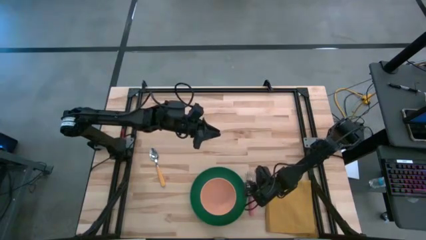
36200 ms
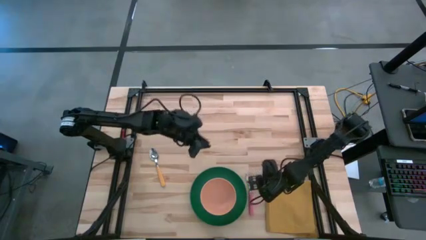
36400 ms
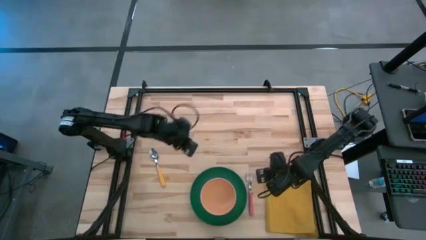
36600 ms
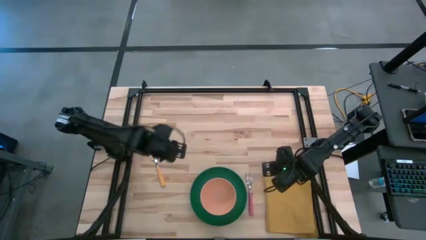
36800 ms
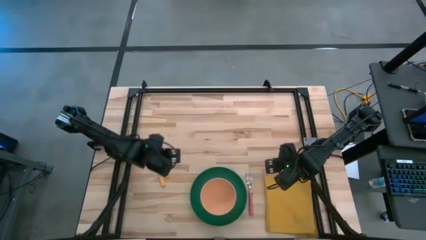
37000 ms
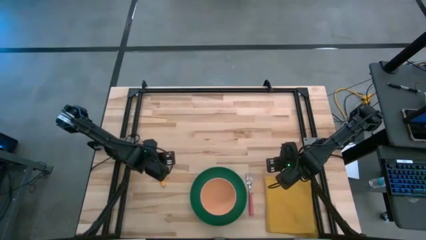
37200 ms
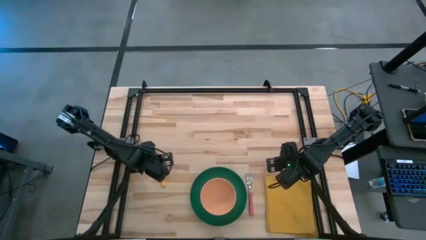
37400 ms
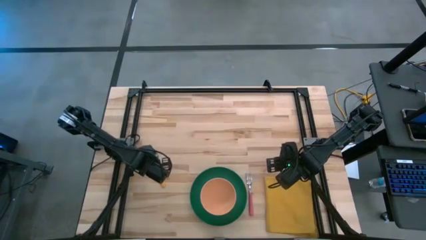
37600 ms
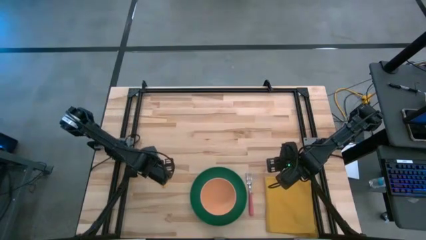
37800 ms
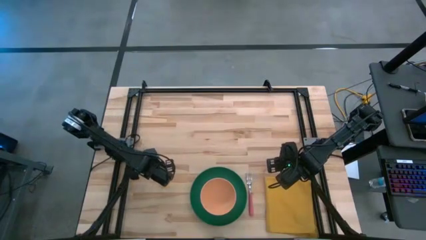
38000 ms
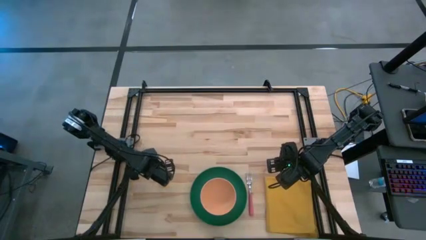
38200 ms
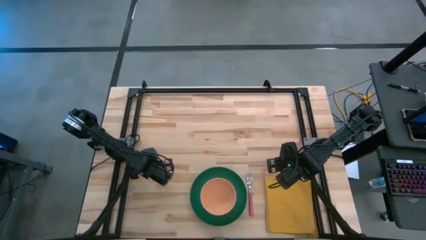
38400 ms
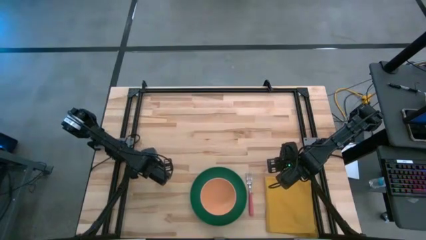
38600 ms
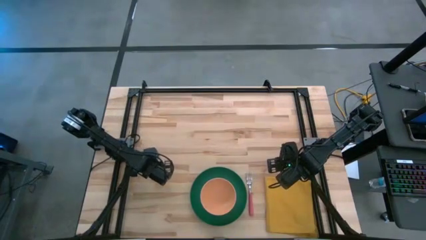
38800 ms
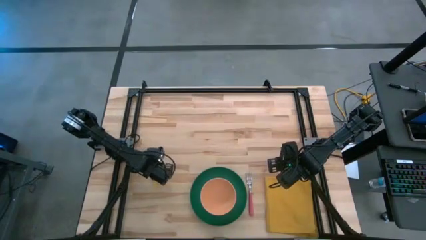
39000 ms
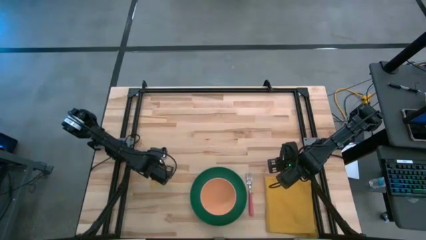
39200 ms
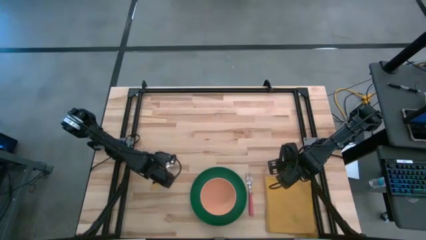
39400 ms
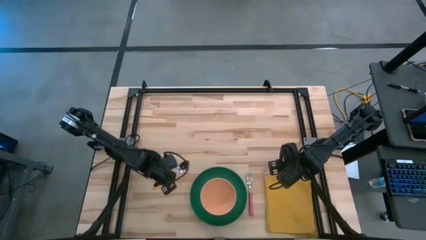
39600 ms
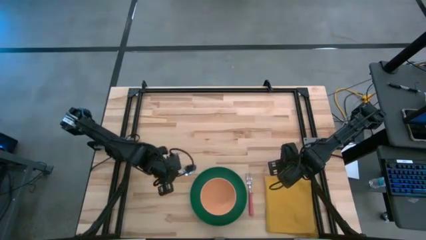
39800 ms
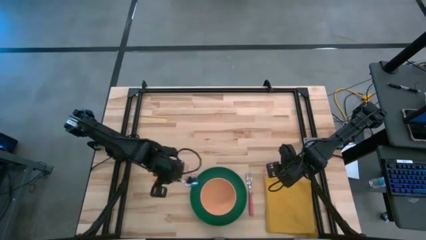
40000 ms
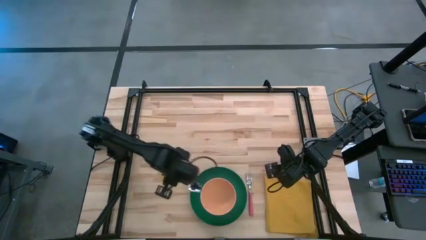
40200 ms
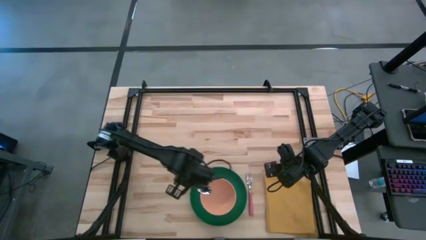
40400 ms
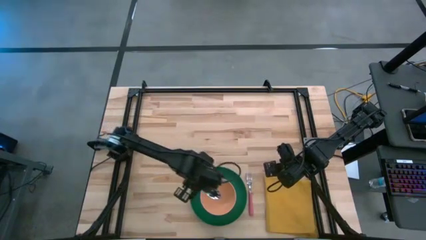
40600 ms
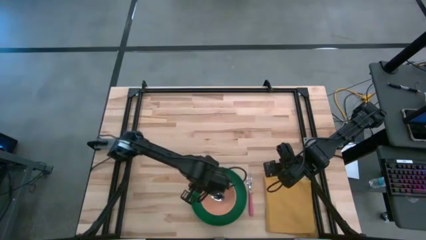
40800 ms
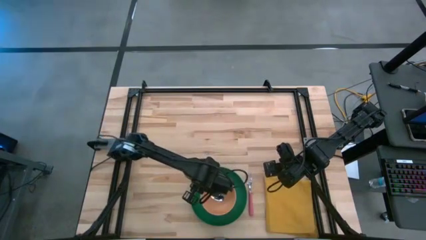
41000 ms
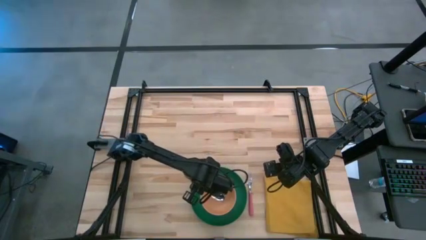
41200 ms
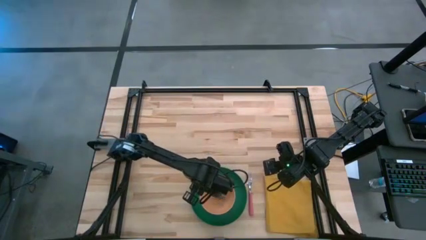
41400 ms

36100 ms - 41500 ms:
Task: Set table place
Put the yellow spoon into the orange bowl

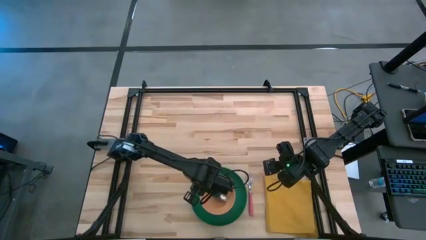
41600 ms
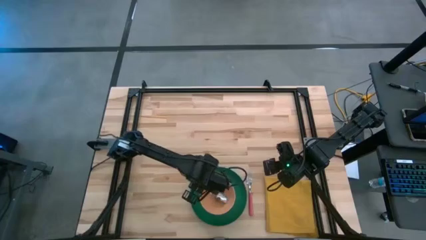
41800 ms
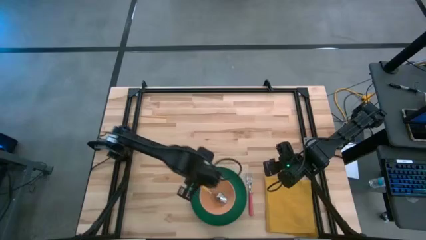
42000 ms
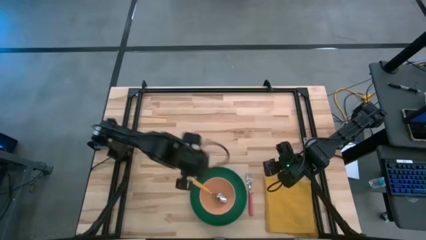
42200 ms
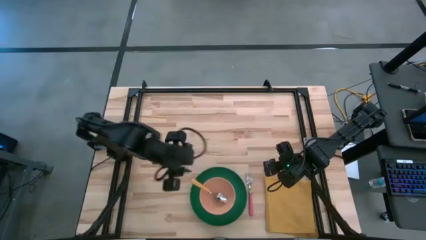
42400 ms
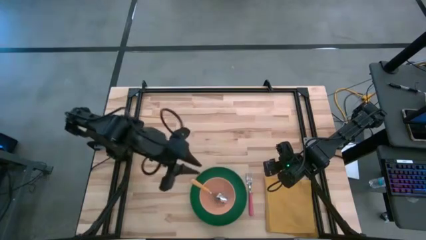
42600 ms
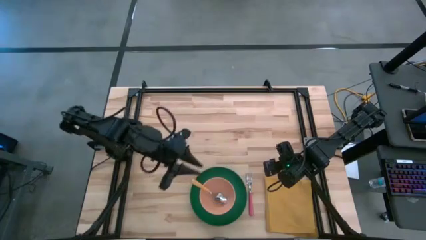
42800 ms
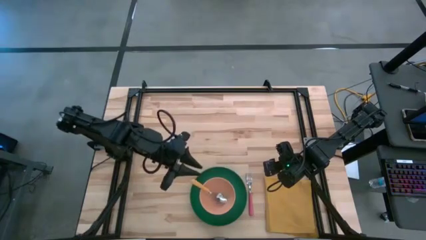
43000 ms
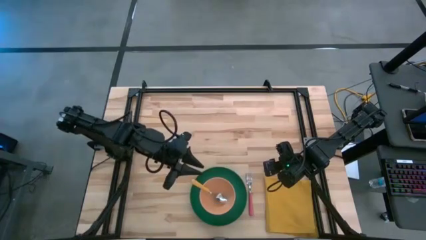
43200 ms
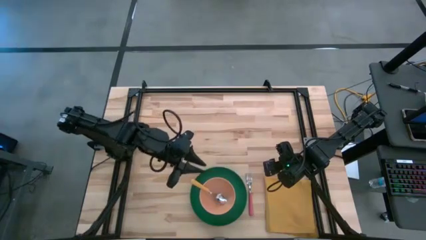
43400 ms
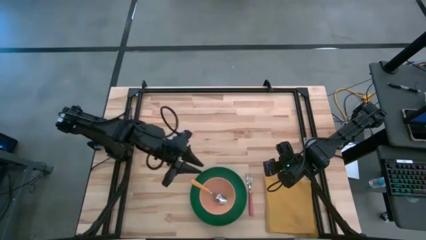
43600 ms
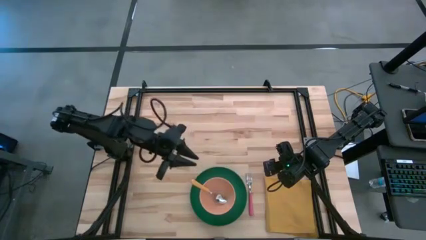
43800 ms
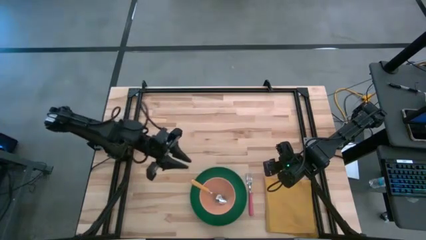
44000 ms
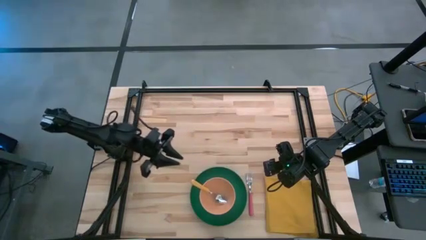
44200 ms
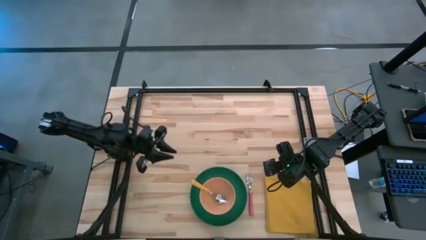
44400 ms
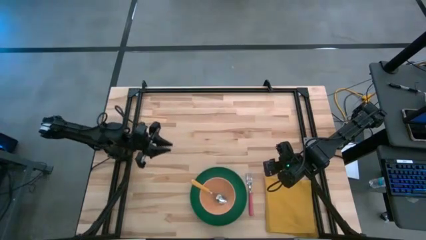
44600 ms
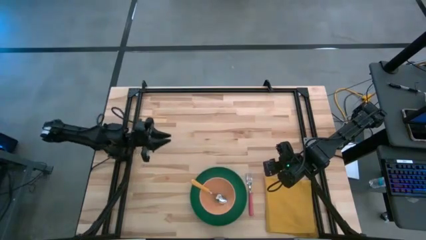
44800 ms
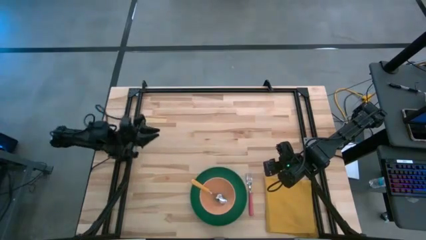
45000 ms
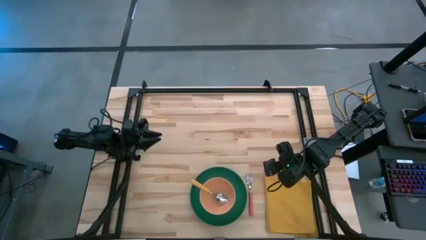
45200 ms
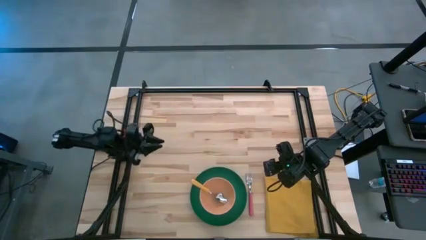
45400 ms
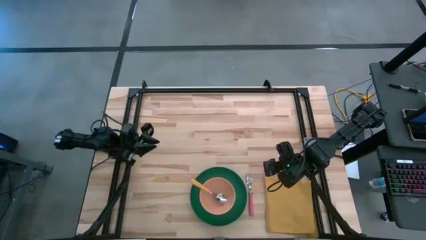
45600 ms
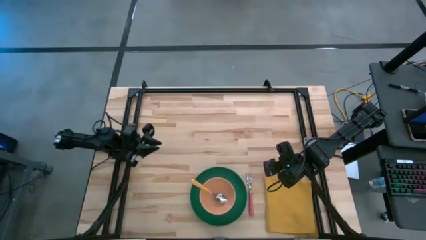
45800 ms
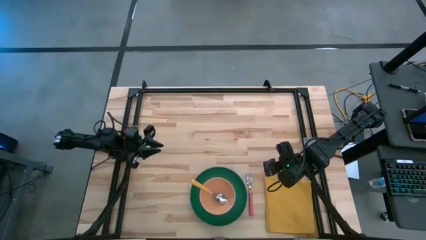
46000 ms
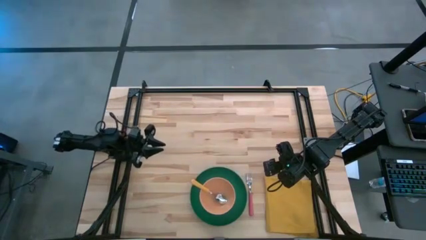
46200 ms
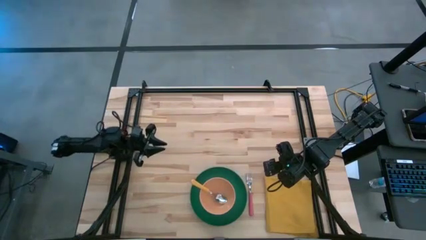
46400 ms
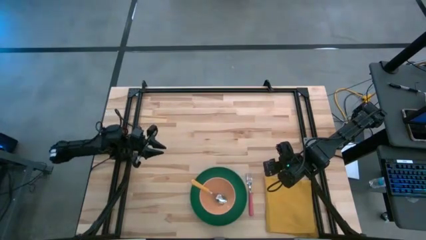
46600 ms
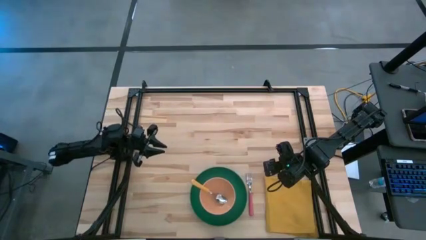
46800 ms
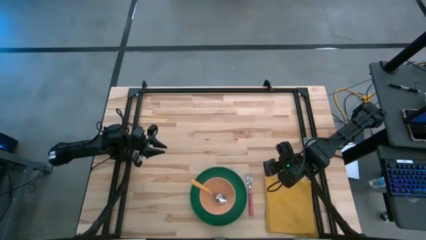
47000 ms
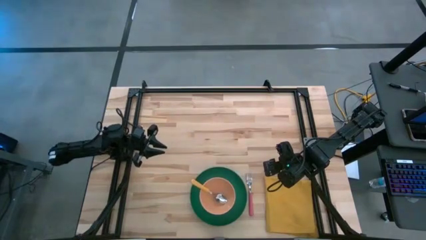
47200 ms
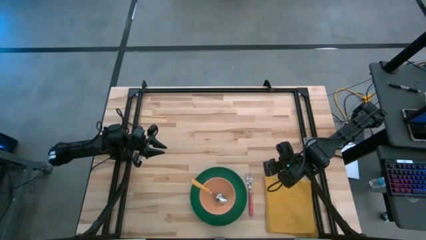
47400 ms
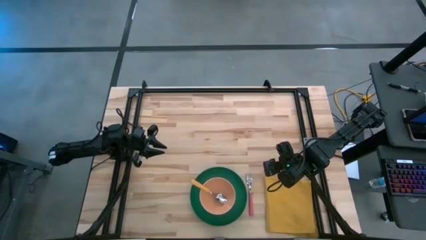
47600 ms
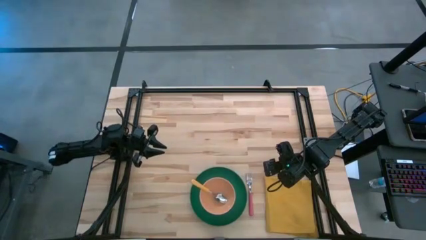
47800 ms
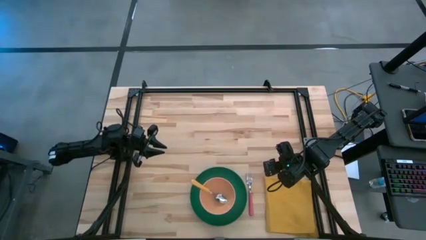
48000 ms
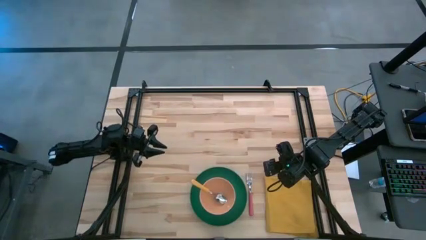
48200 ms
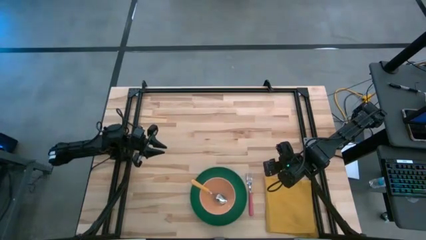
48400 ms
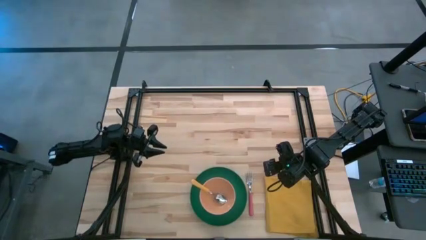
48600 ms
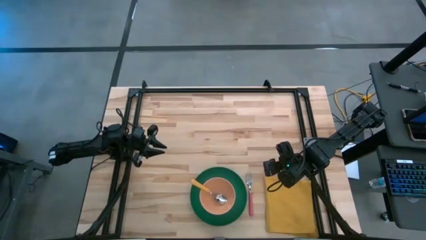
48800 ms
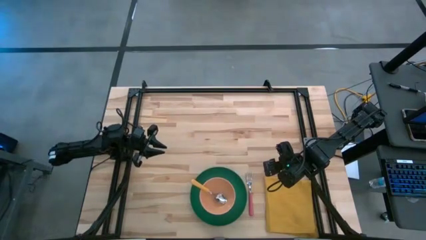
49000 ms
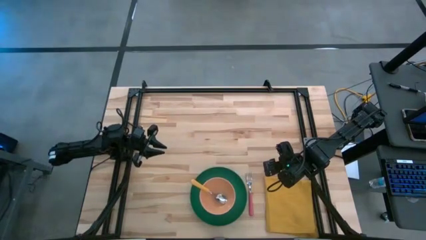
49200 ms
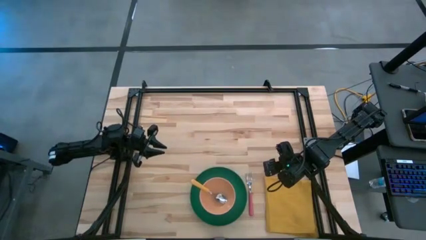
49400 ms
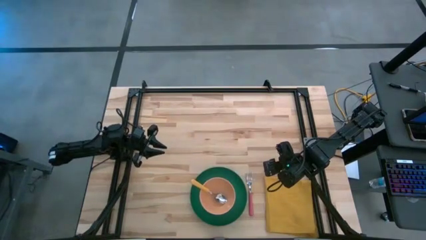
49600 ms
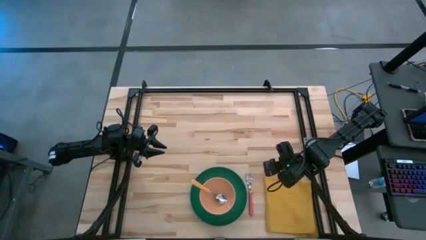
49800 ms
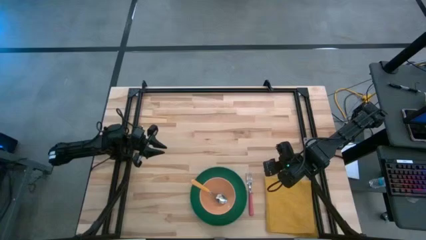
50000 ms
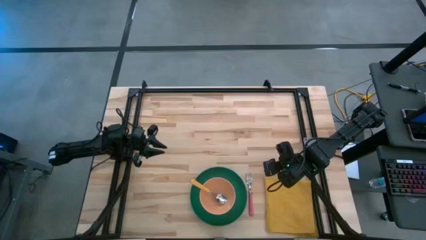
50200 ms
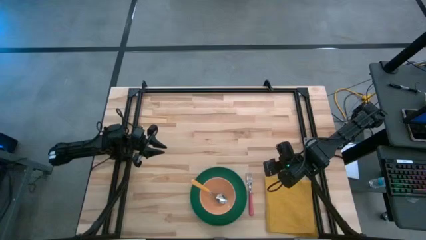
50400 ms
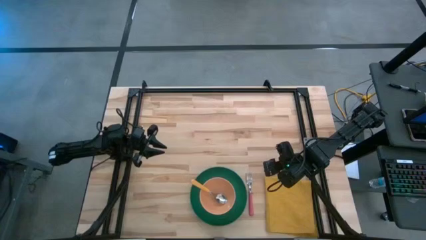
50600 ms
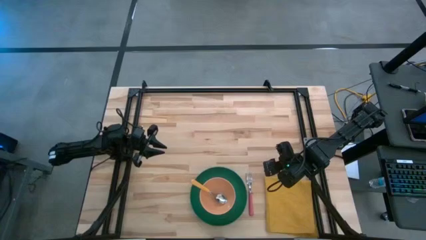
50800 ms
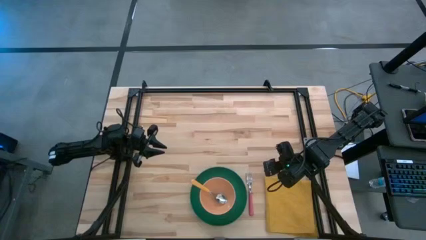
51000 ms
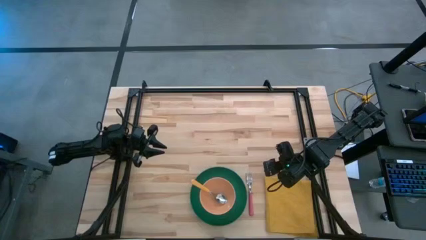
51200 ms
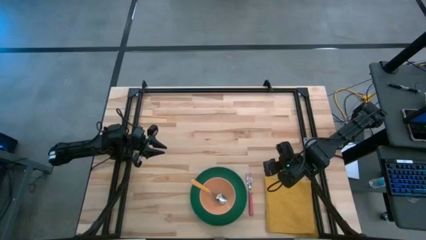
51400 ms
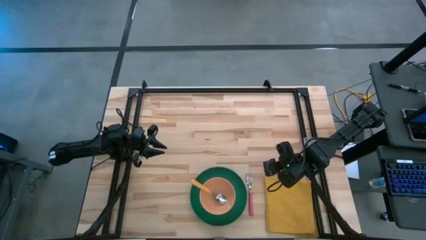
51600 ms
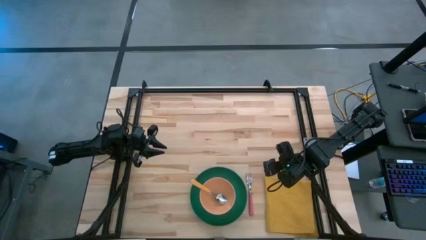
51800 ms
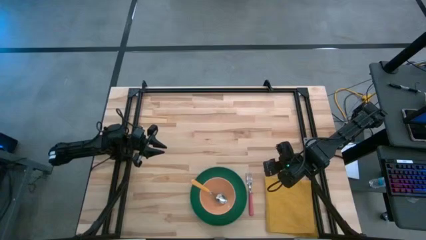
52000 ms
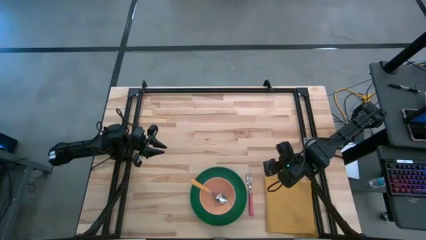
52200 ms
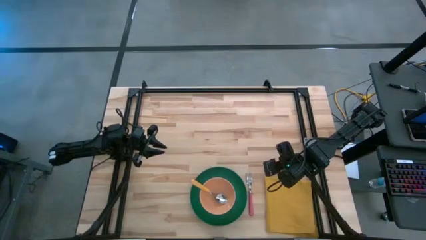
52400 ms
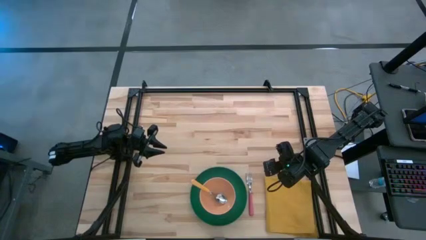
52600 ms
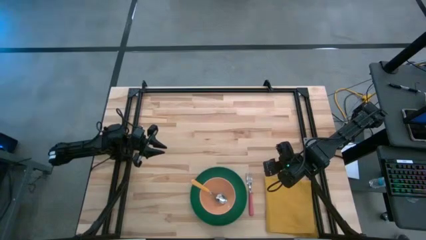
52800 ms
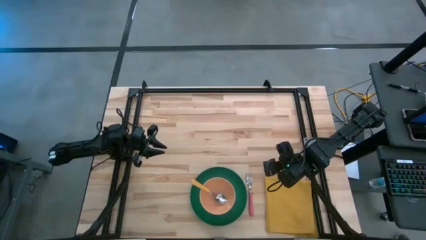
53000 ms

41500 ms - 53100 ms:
Return to Home Position
